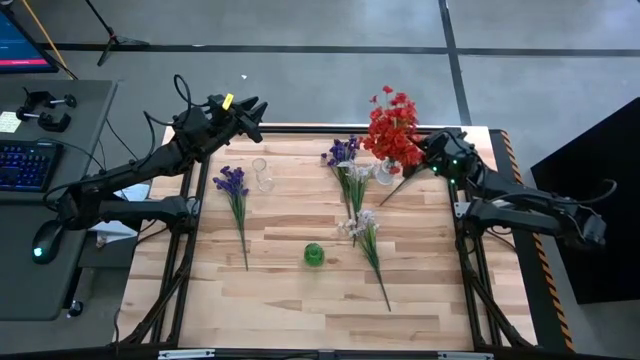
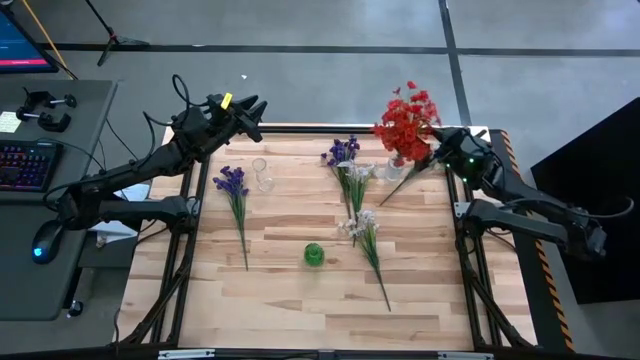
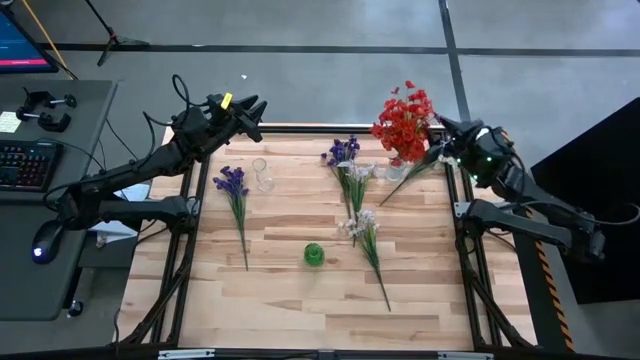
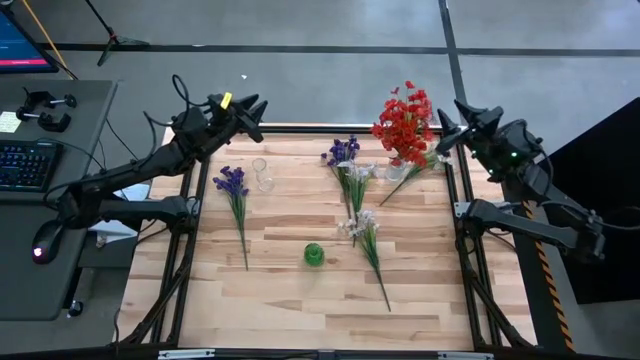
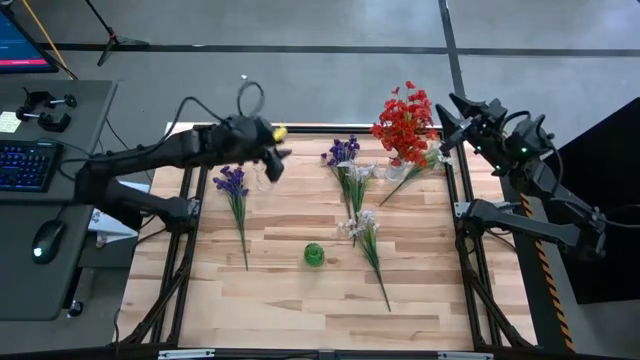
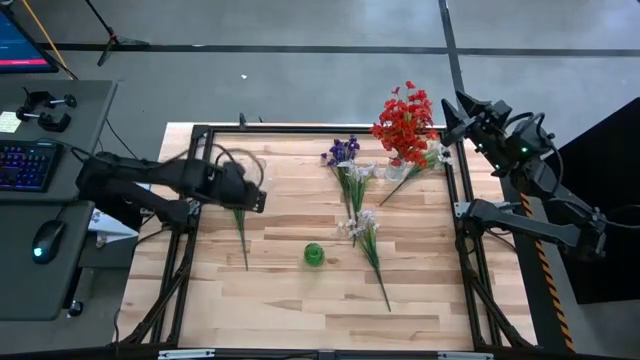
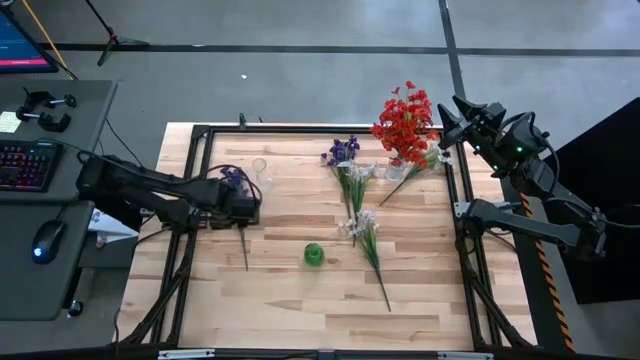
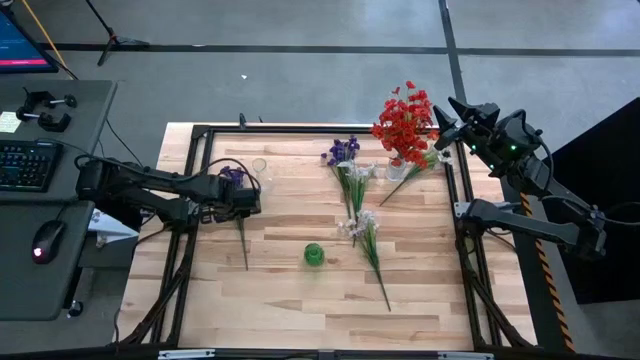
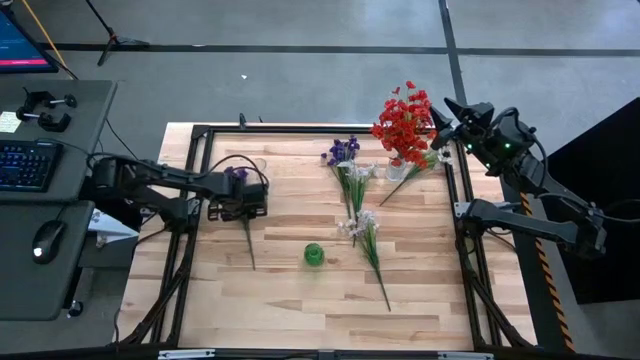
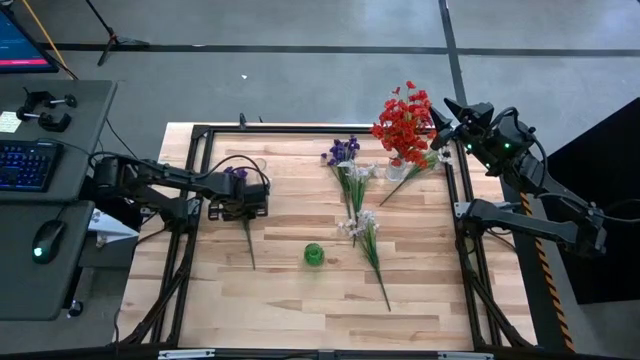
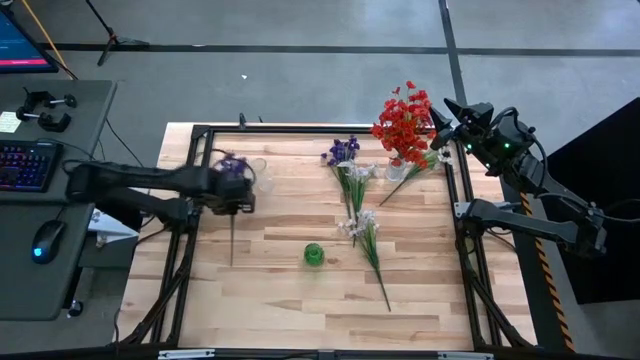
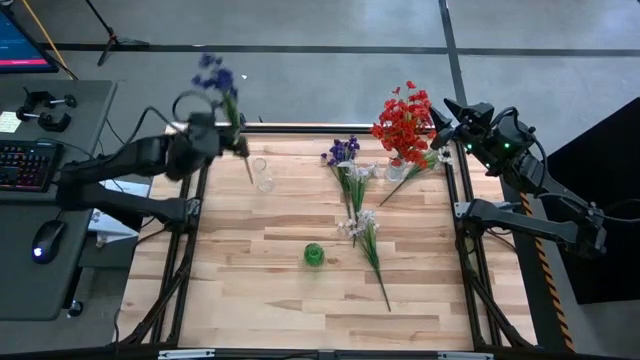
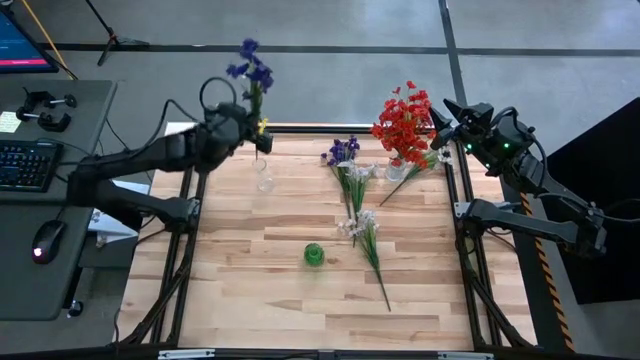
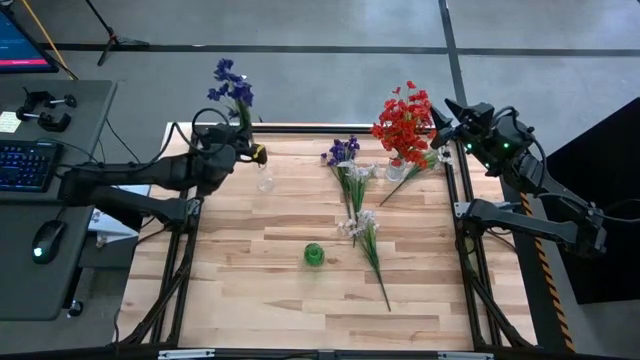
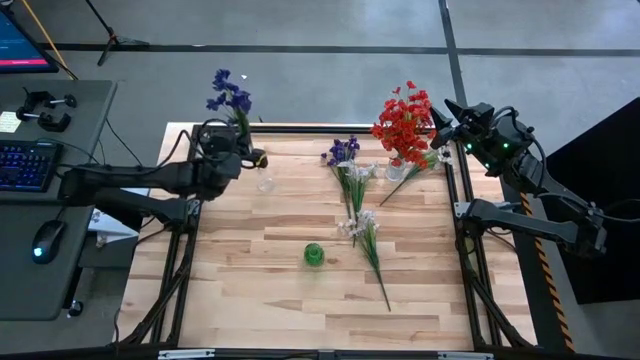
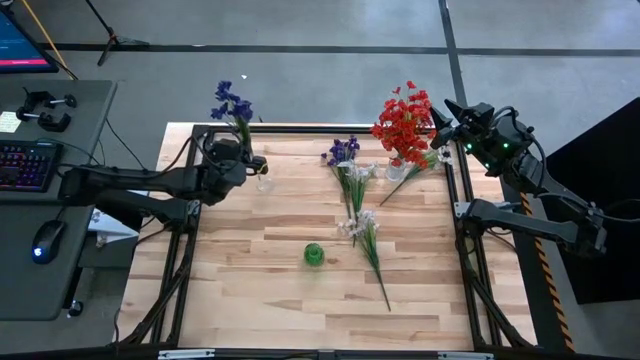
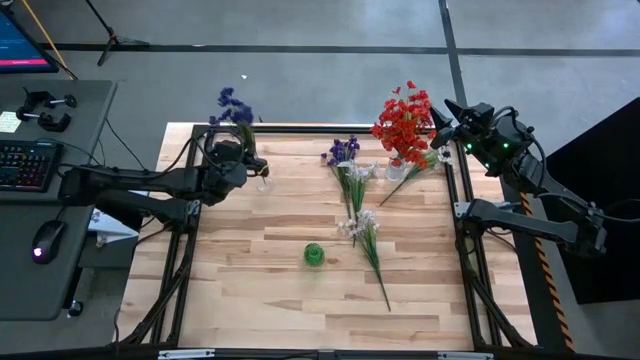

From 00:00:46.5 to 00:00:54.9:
Task: Sort flowers into vase by color
Put the left violet flowers into the top left transparent flower vase

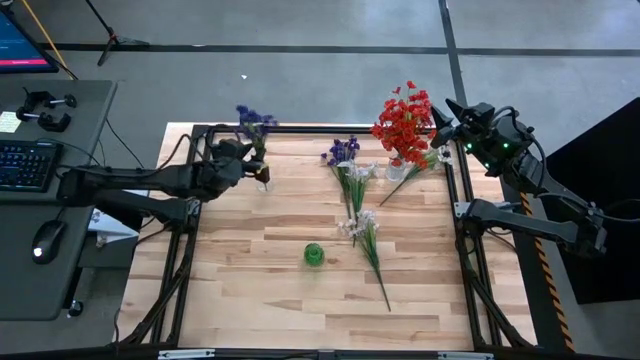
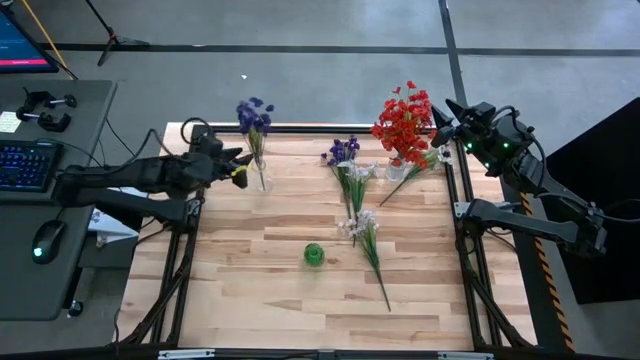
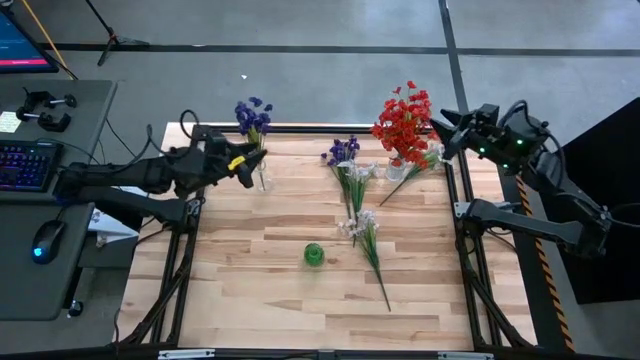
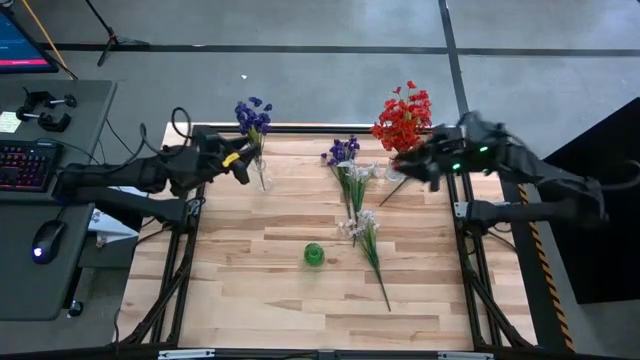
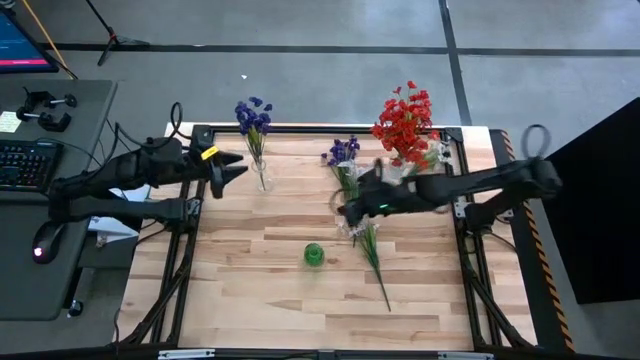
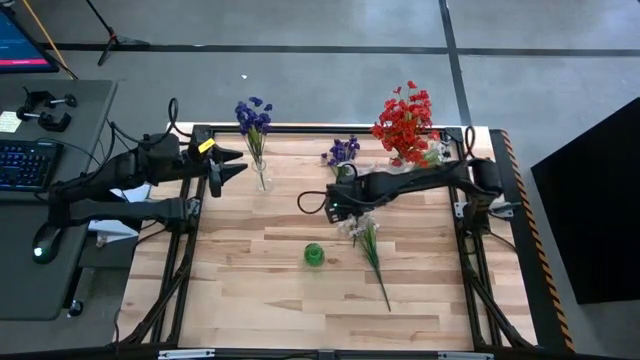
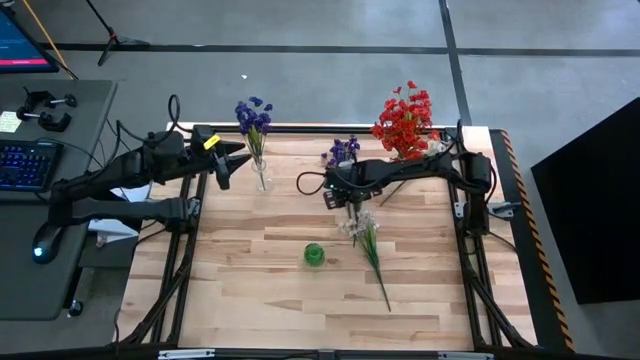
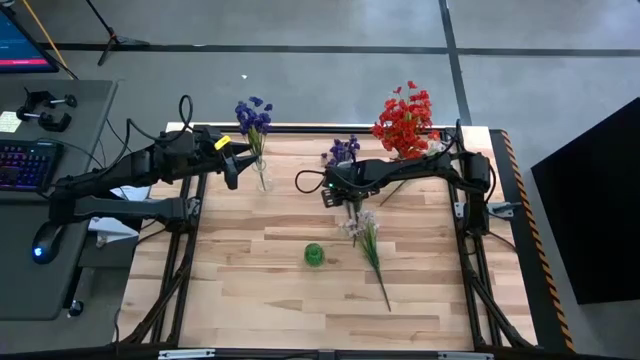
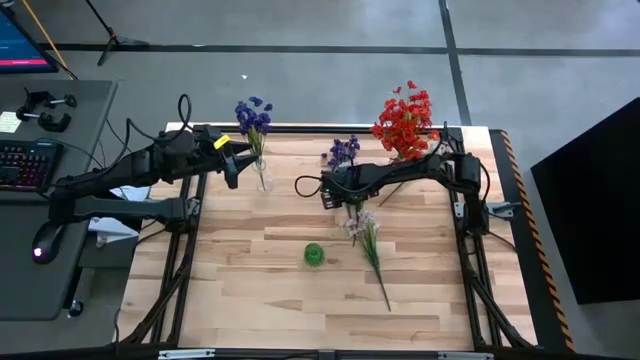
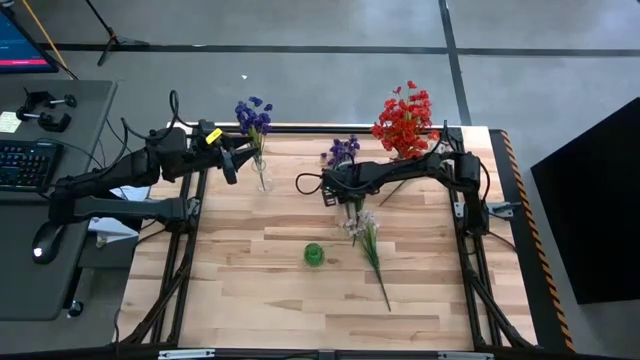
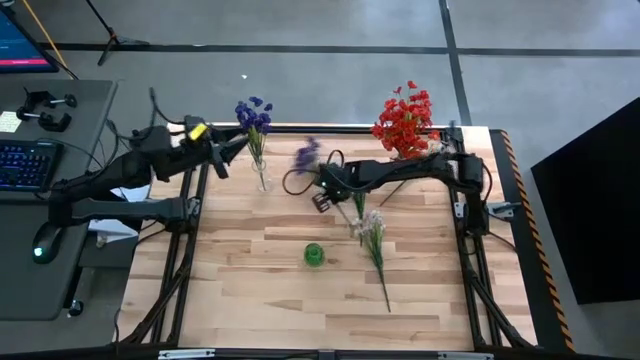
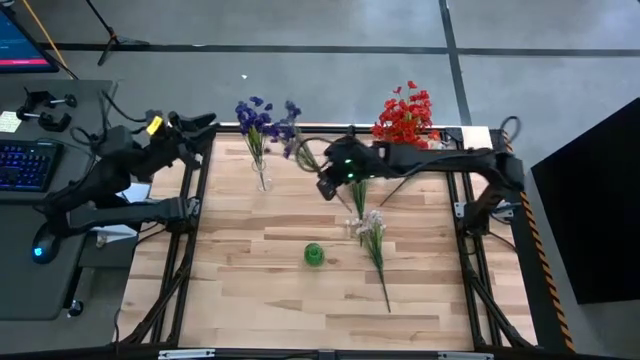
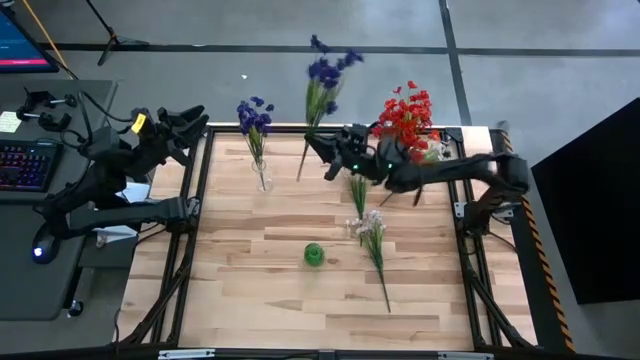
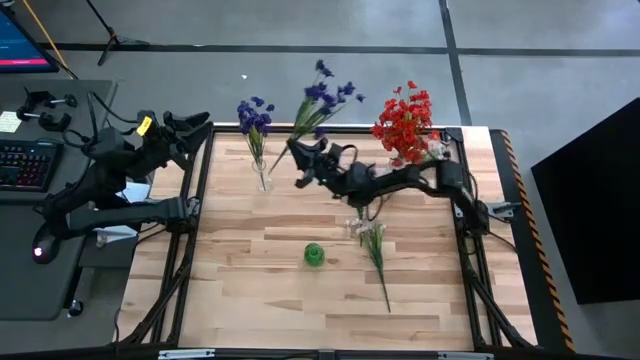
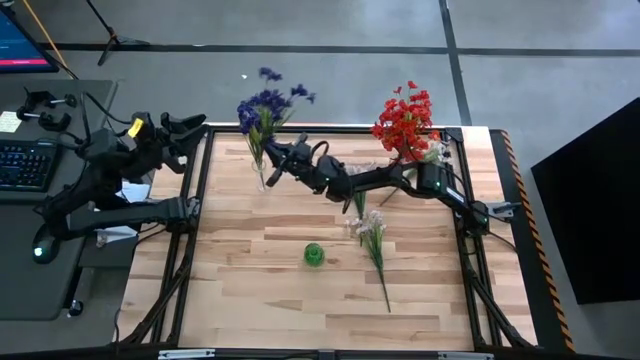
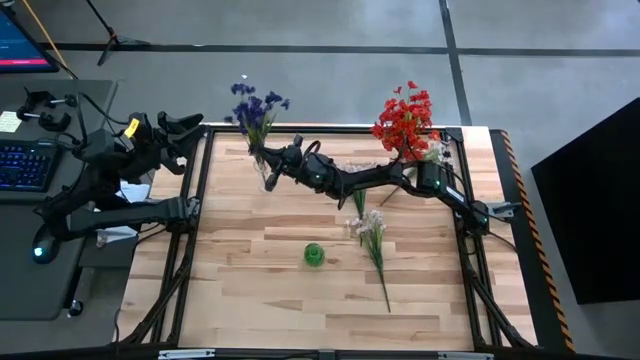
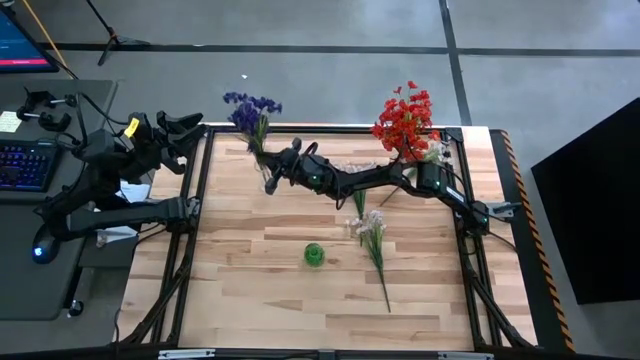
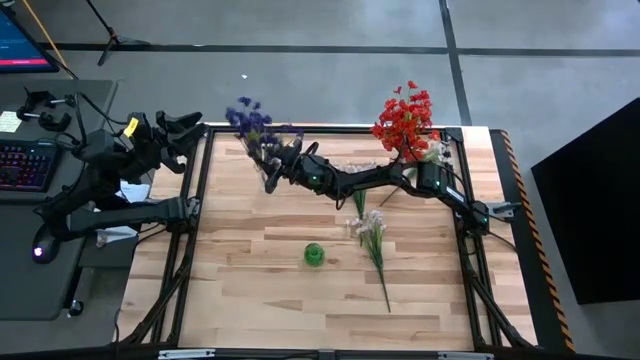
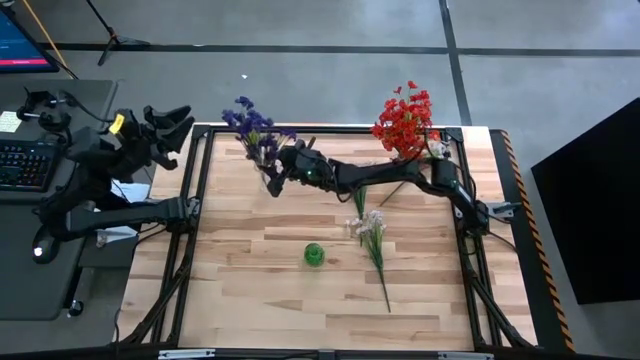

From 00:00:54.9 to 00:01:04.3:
Put the violet flowers into the top left transparent vase
